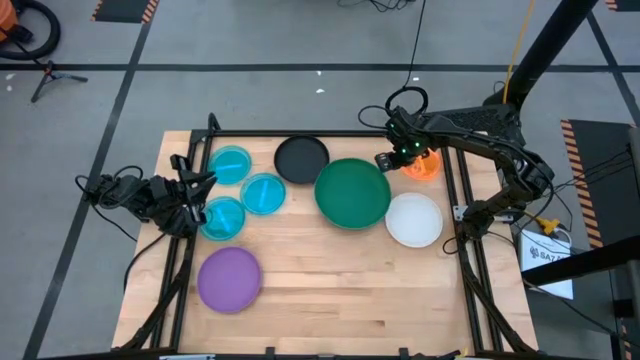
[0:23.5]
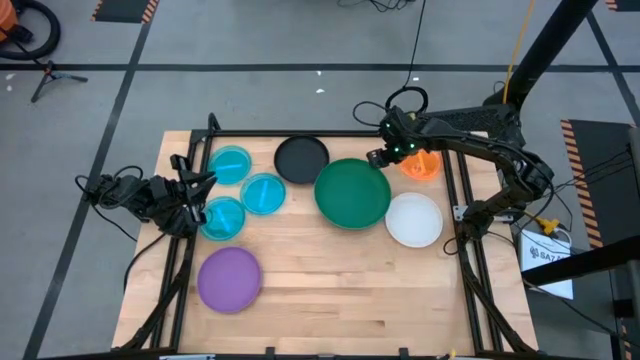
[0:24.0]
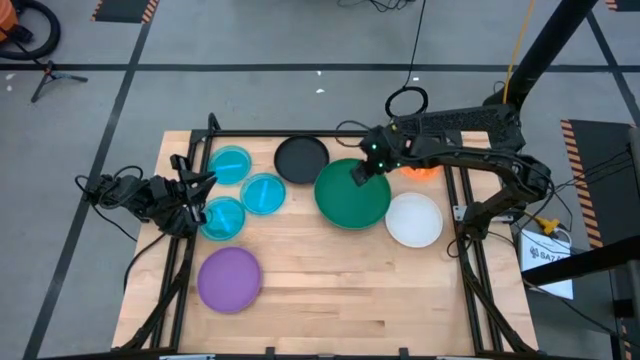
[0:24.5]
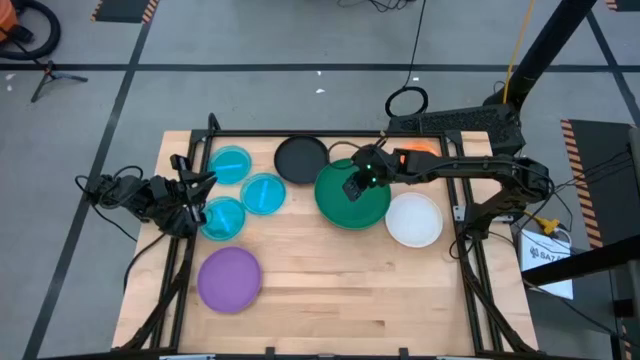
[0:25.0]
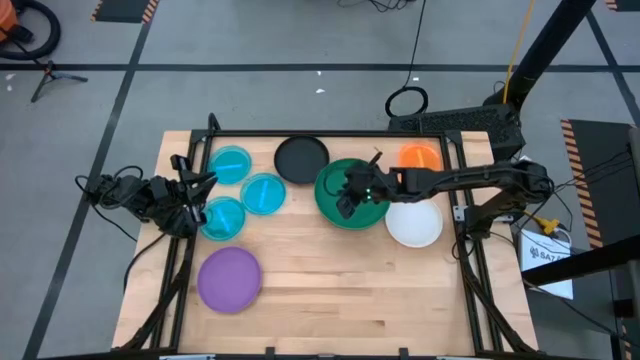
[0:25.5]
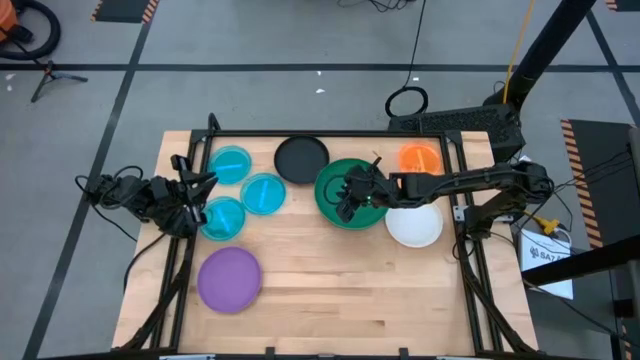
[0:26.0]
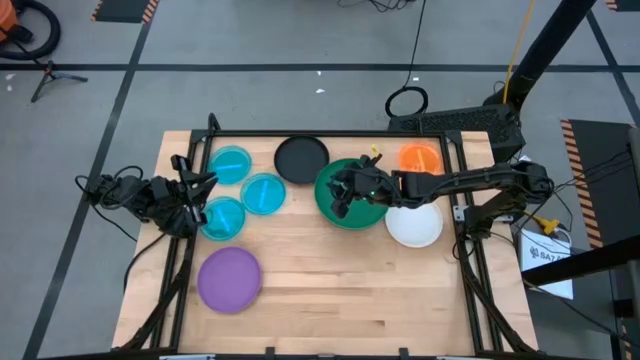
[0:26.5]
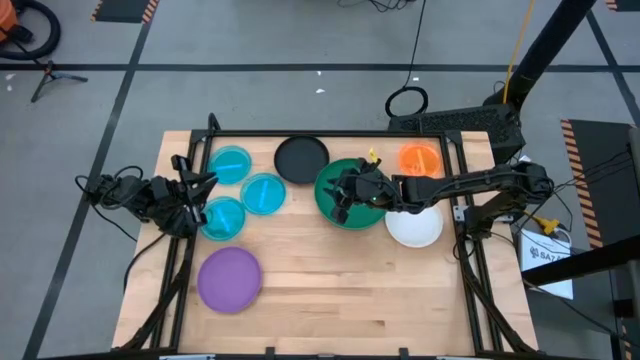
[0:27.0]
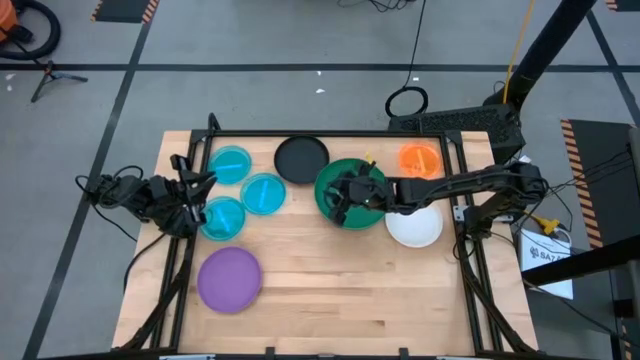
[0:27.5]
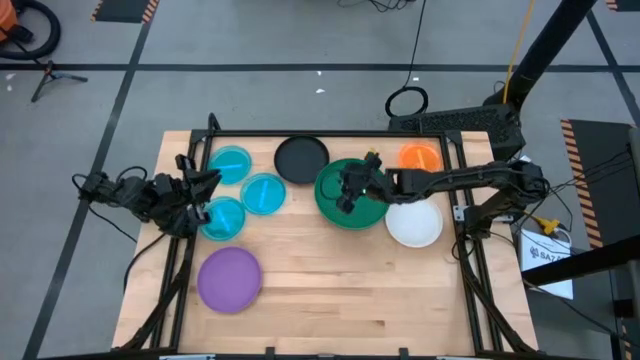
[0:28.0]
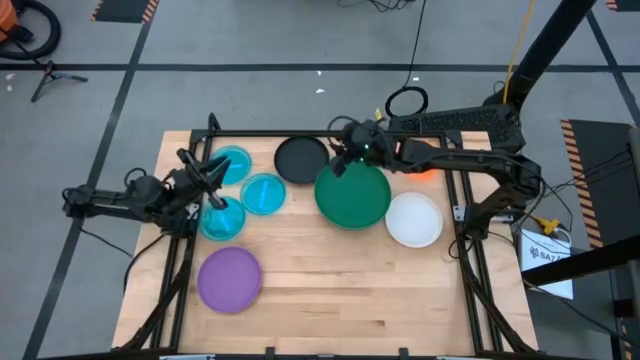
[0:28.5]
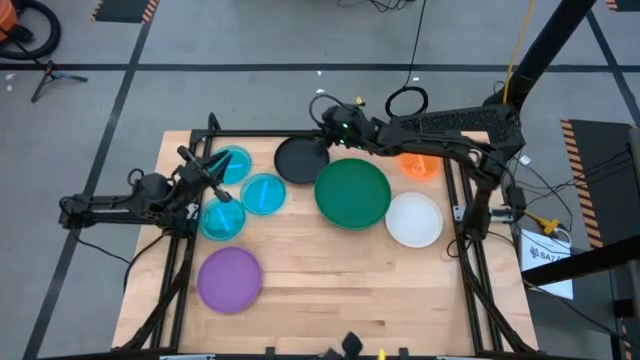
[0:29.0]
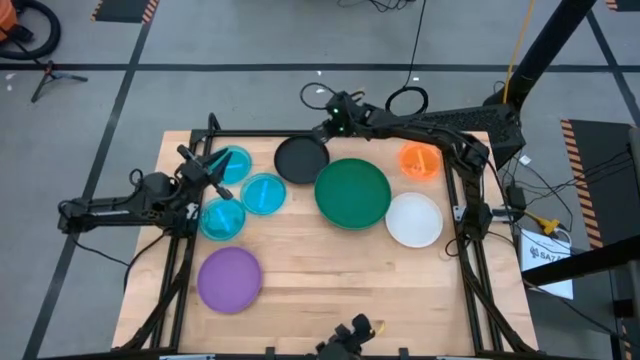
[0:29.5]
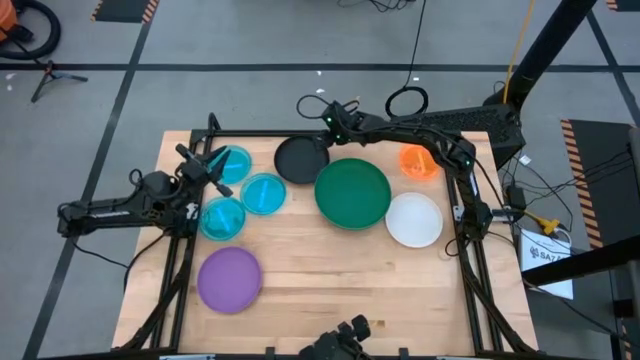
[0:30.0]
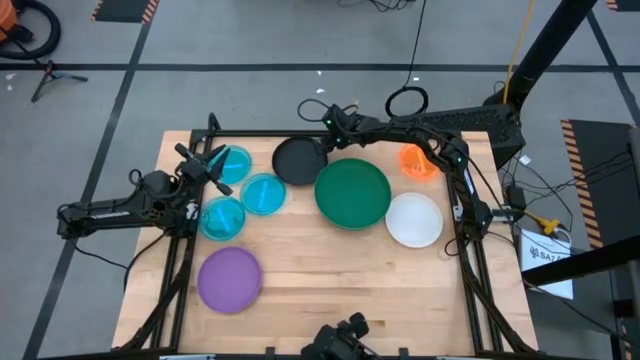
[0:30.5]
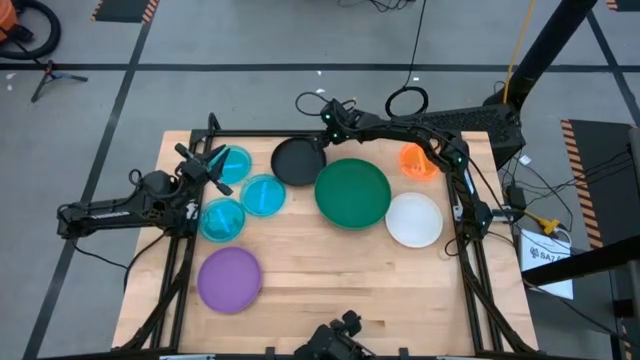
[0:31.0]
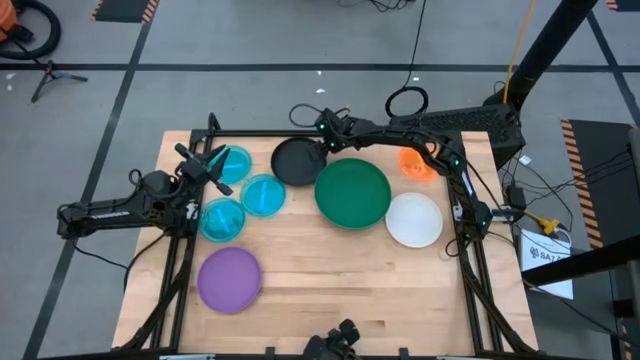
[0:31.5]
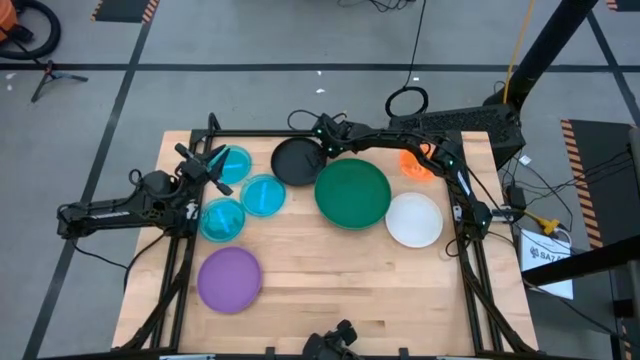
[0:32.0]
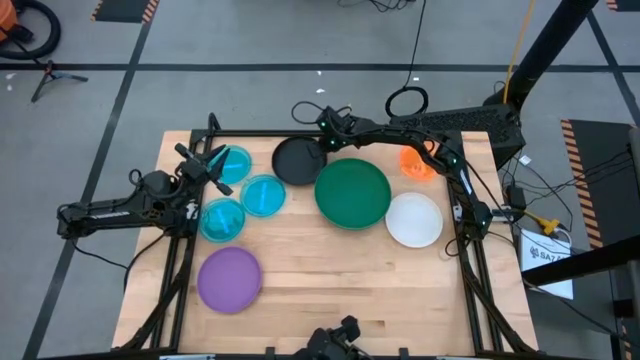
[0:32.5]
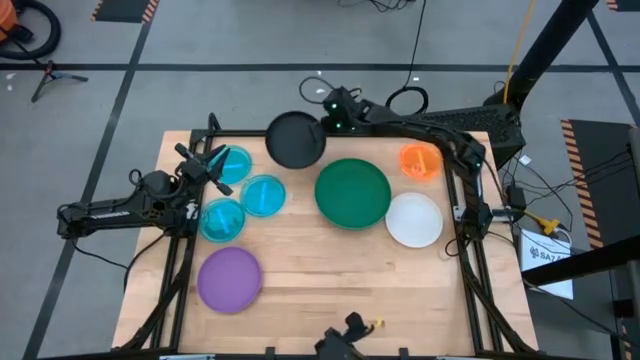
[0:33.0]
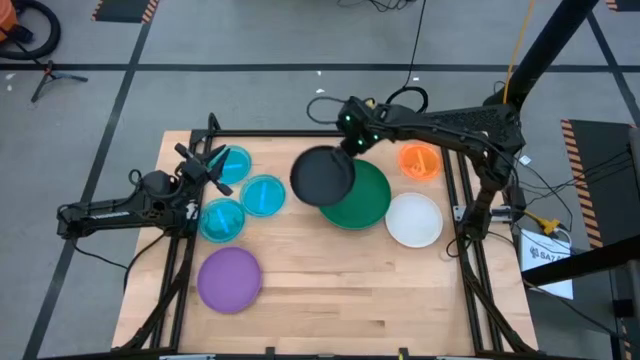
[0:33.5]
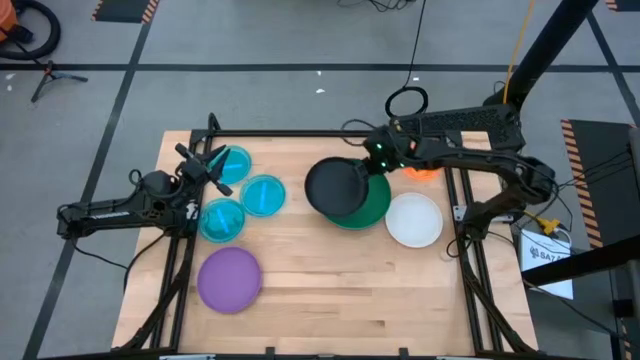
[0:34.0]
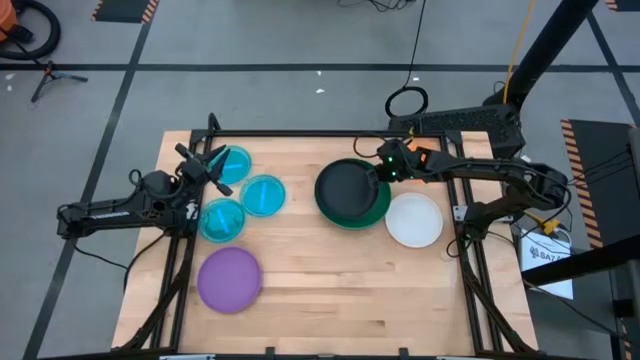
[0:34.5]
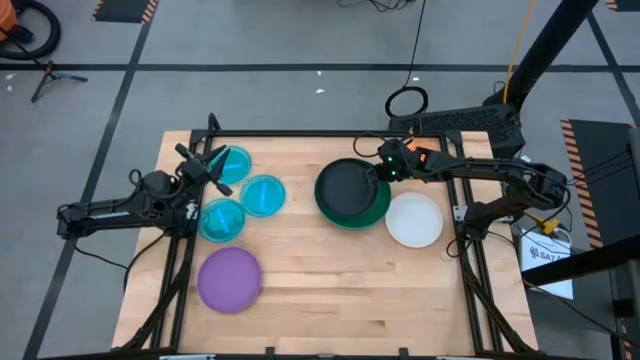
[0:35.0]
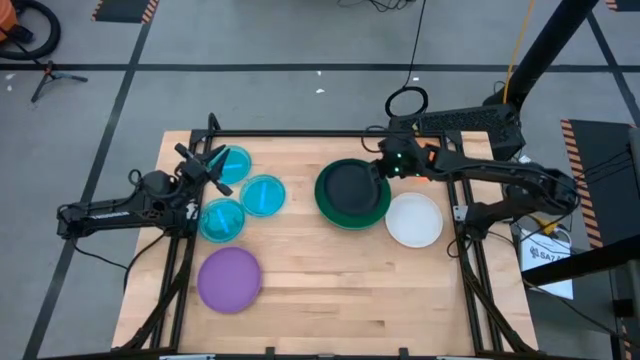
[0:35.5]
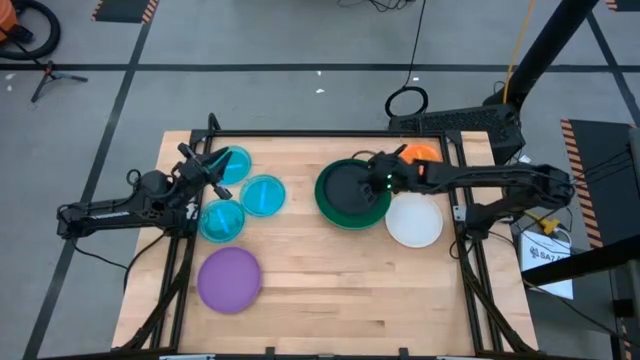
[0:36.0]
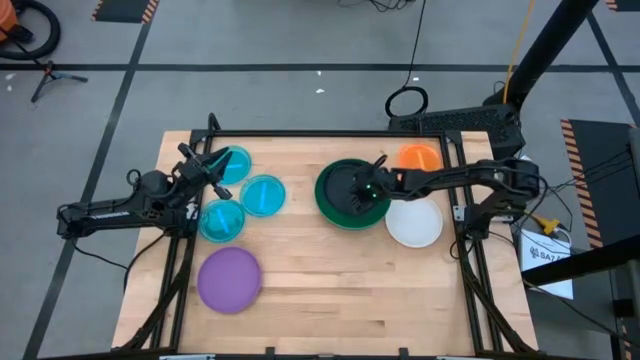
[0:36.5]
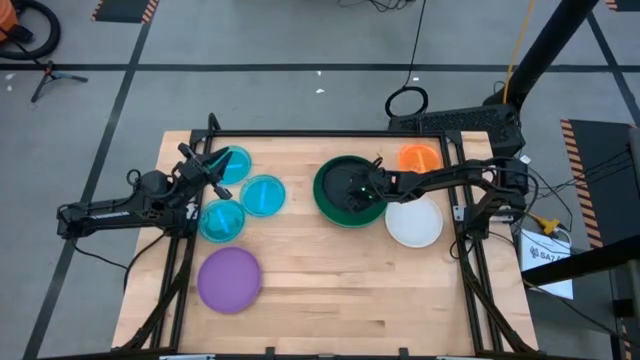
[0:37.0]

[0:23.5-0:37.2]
Task: Stack plastic plates
Stack the black plate on the green plate

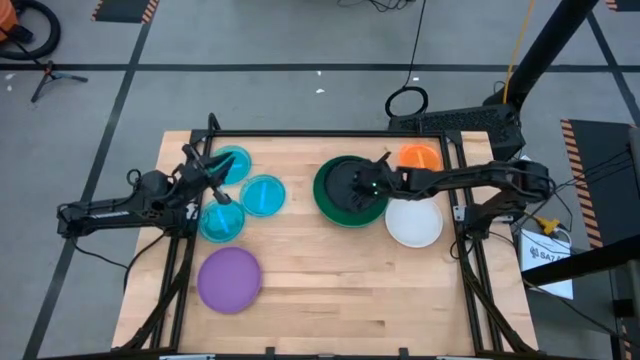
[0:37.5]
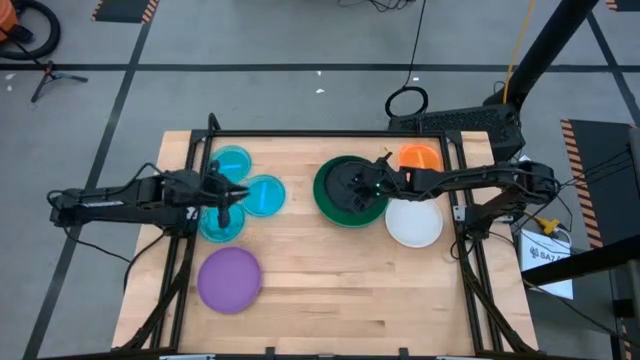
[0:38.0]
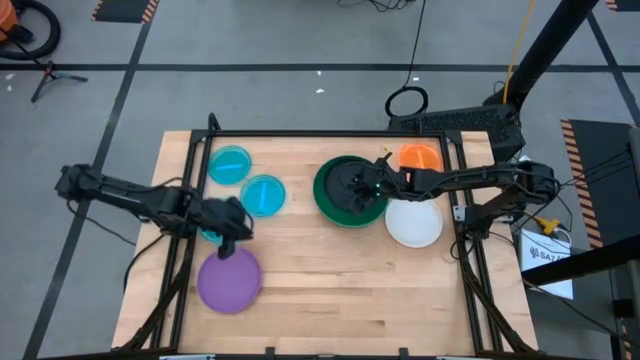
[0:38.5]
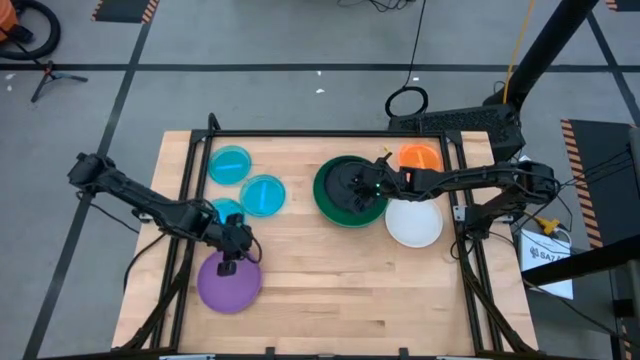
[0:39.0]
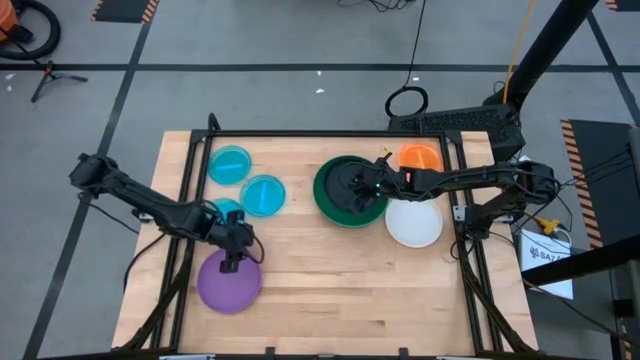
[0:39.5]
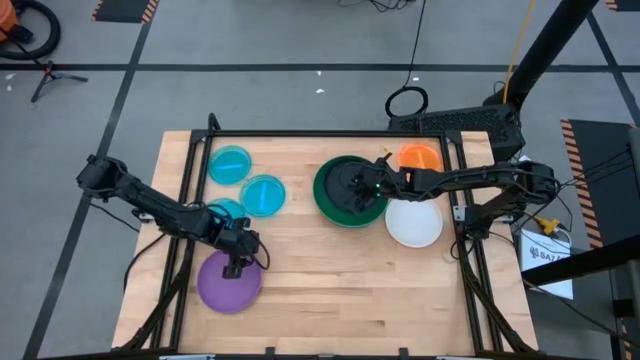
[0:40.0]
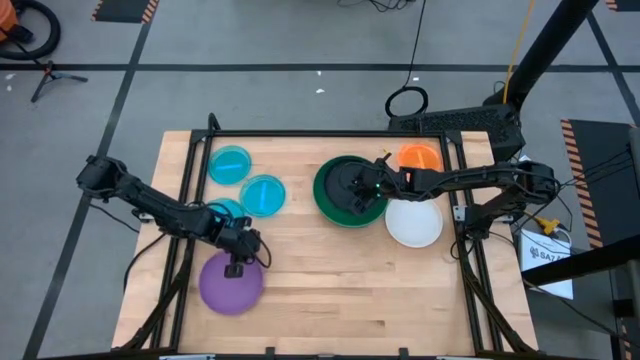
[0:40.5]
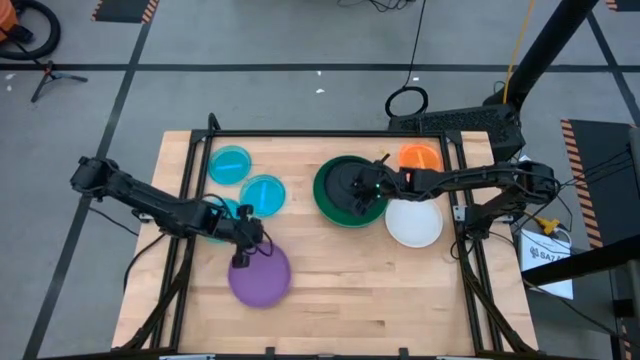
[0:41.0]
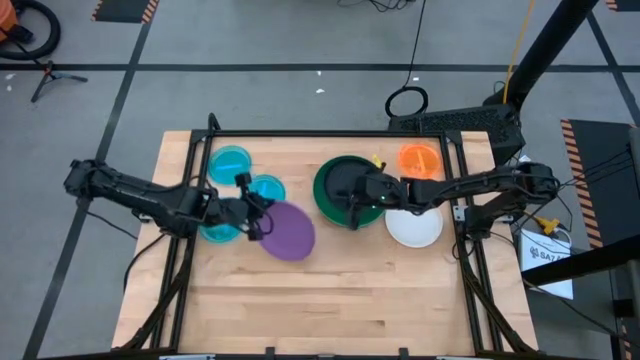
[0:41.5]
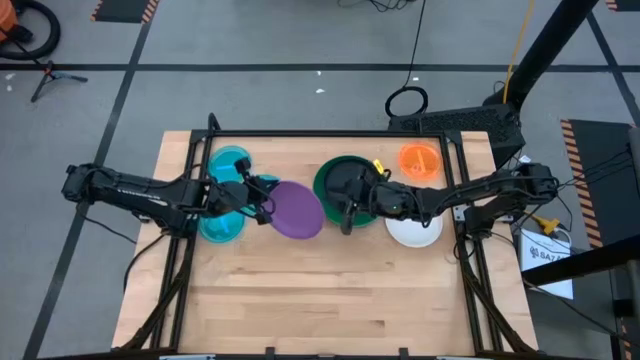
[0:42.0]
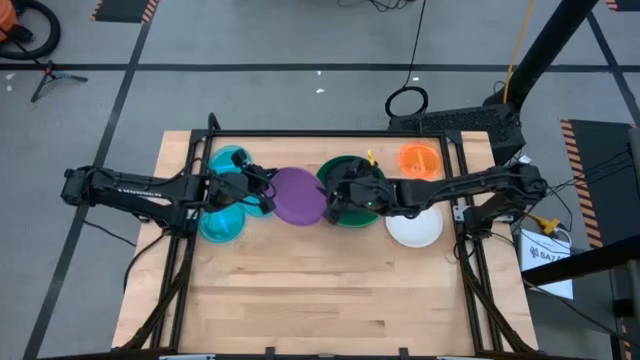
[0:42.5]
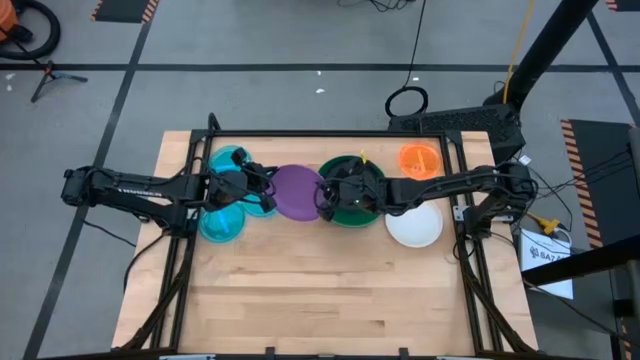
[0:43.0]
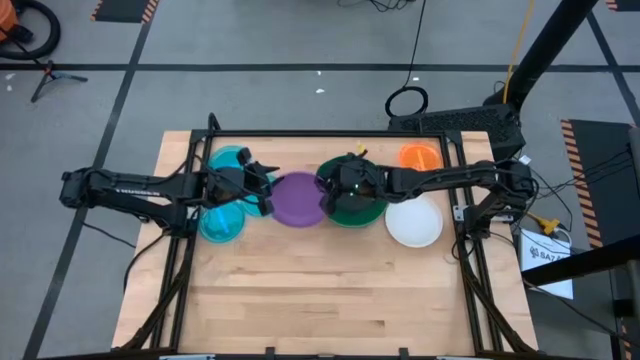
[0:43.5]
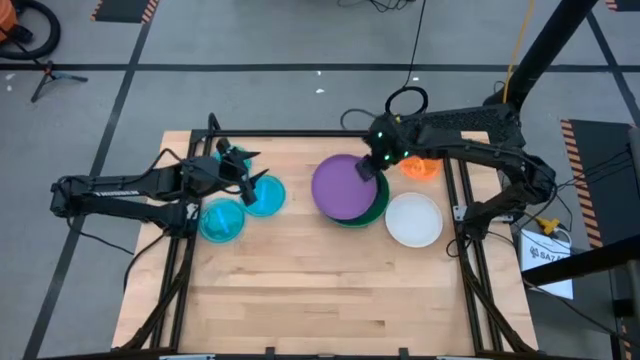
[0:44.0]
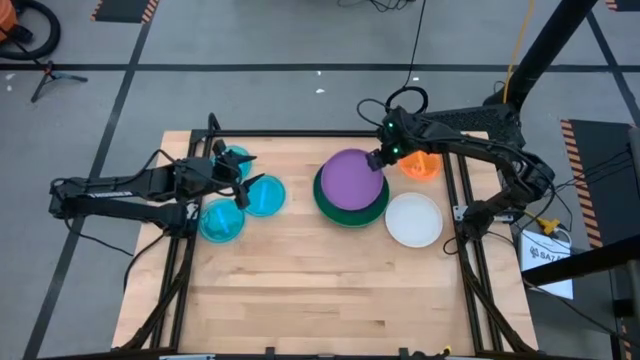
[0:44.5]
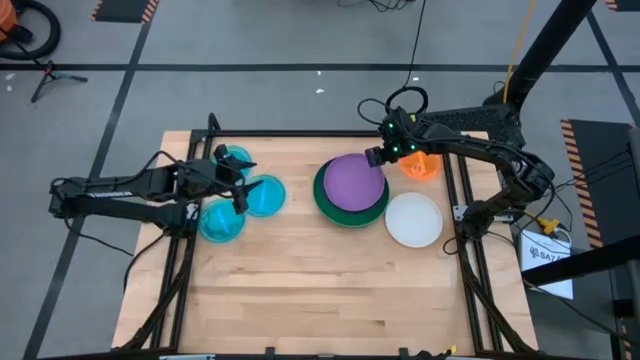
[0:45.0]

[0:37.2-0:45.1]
Stack the purple plate on the black plate
